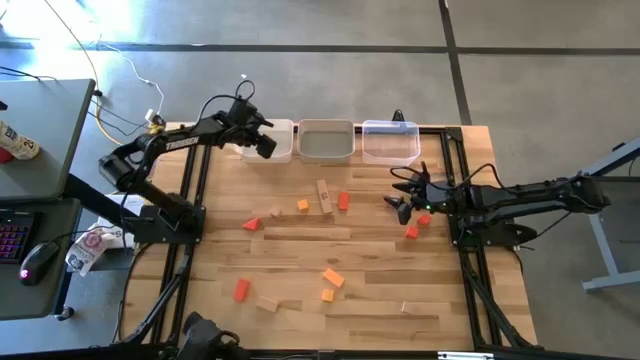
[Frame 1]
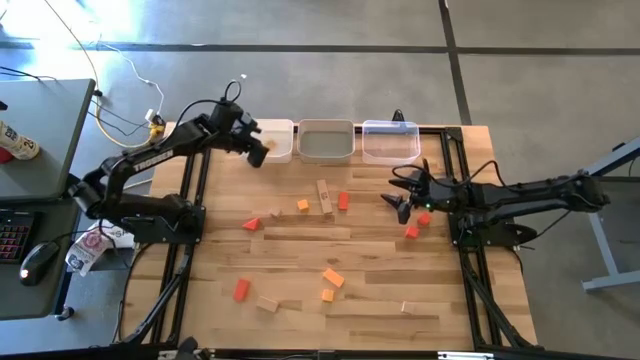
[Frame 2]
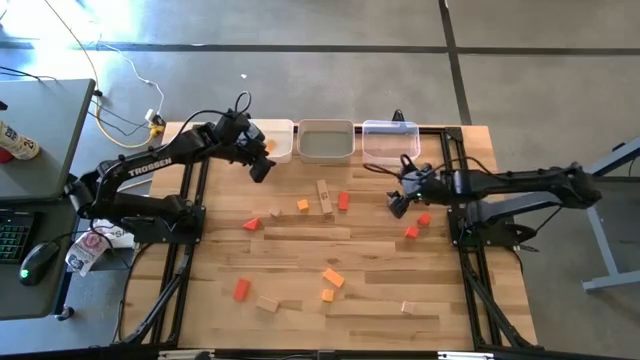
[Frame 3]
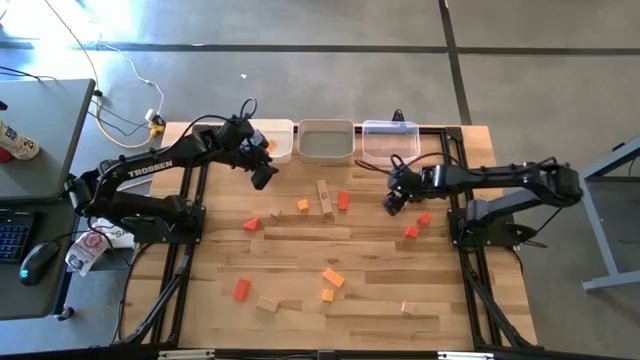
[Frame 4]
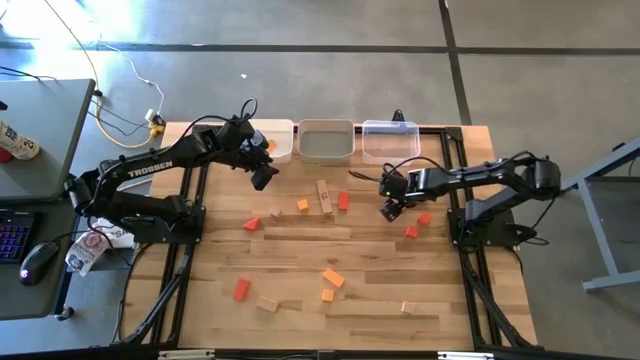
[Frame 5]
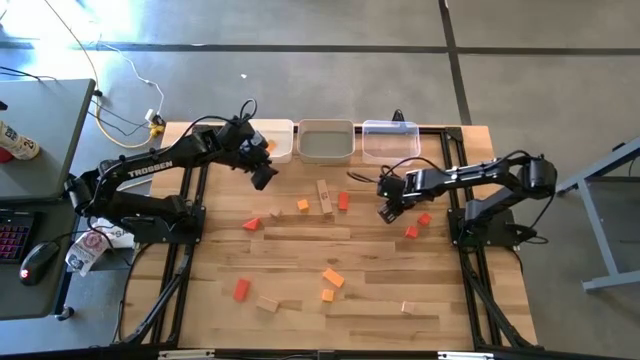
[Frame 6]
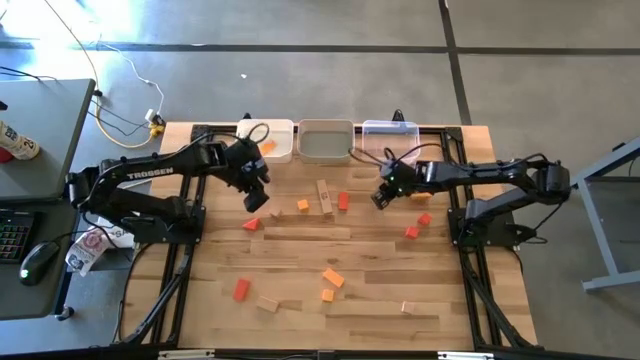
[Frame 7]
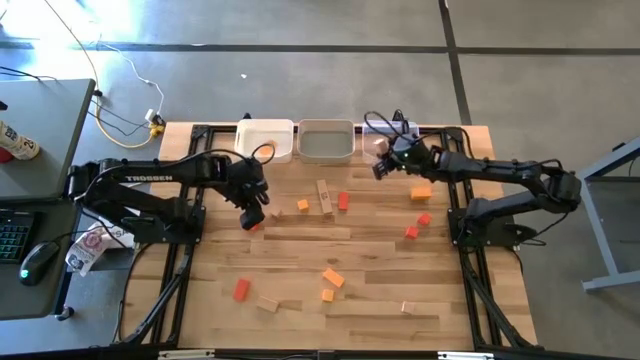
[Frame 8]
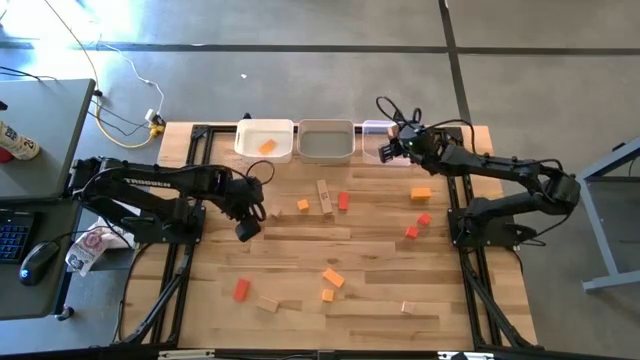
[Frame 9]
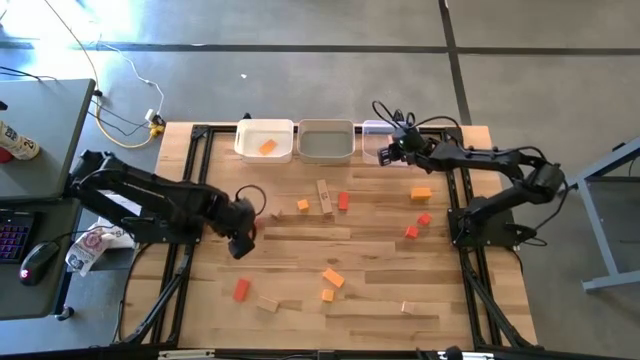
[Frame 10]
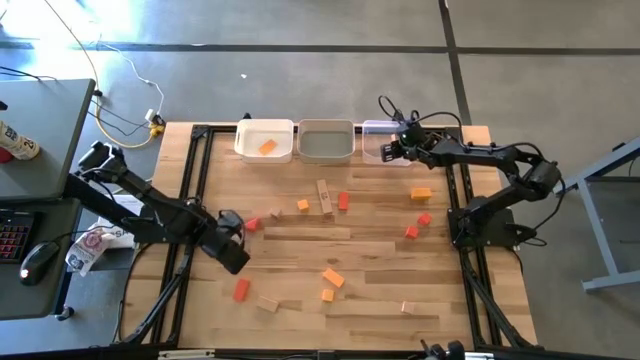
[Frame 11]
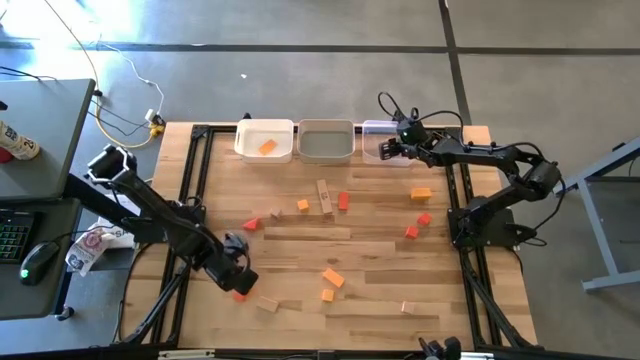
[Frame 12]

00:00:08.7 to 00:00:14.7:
Task: Sort & place blocks by color
Put the brown block into the transparent bin

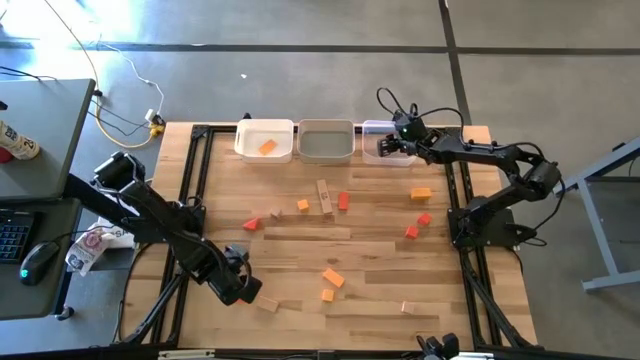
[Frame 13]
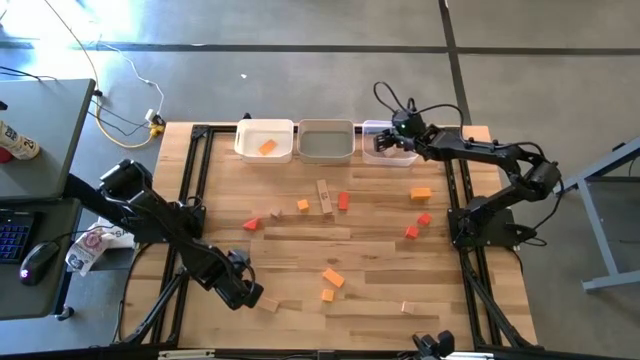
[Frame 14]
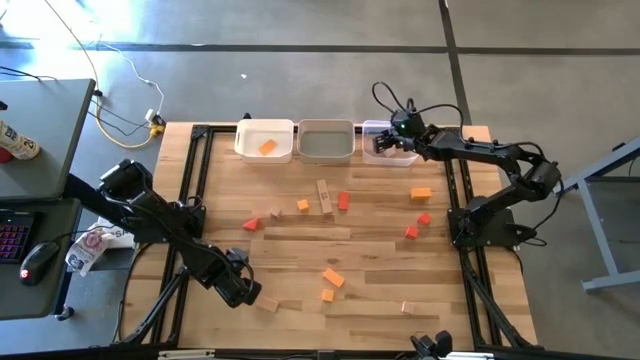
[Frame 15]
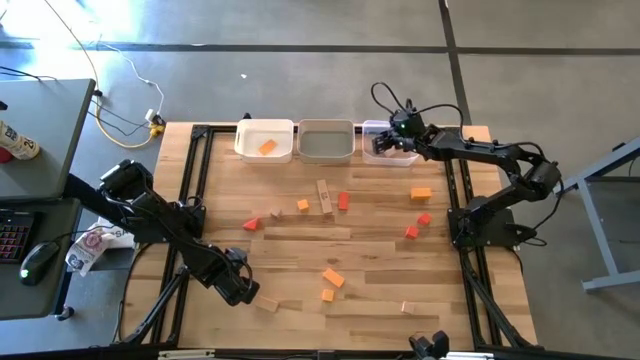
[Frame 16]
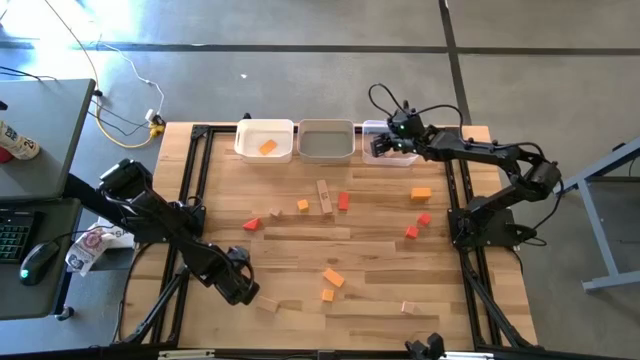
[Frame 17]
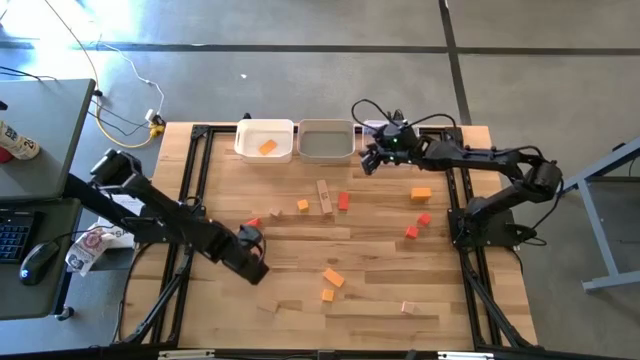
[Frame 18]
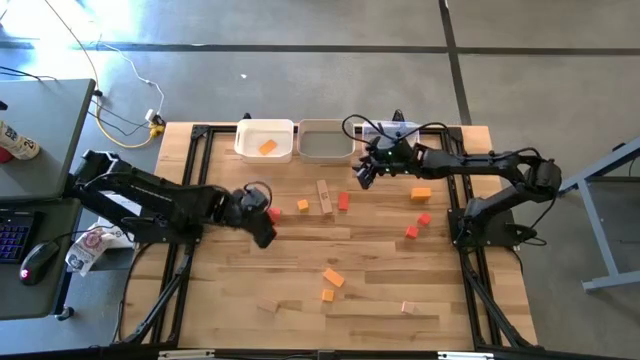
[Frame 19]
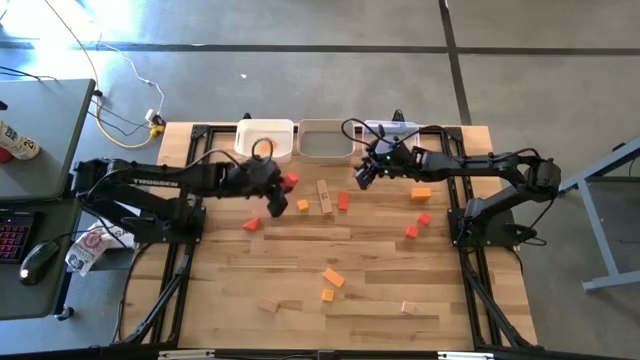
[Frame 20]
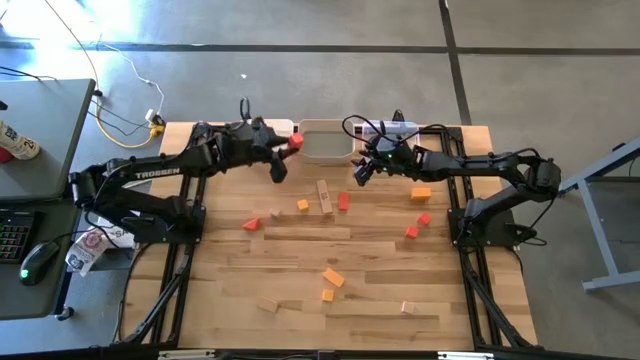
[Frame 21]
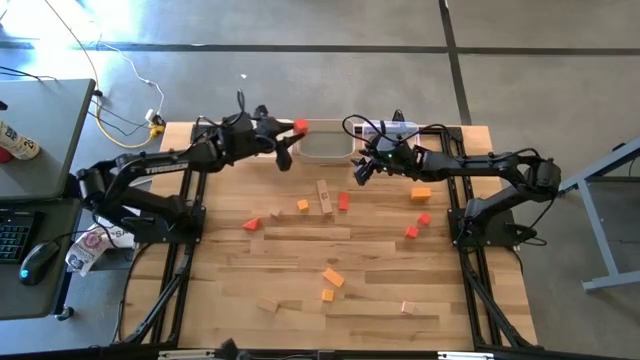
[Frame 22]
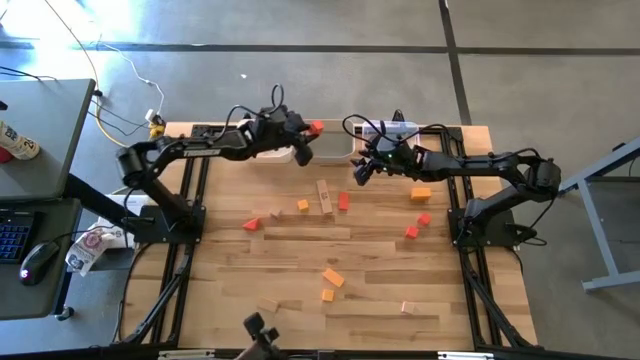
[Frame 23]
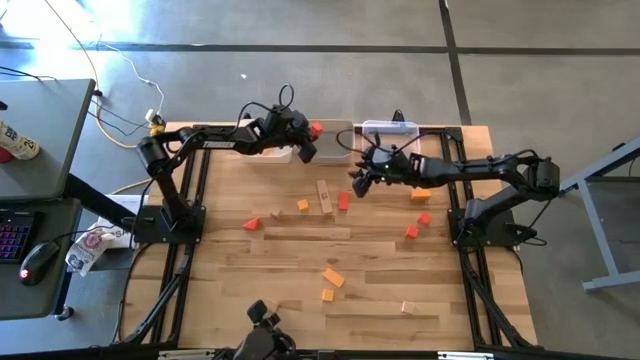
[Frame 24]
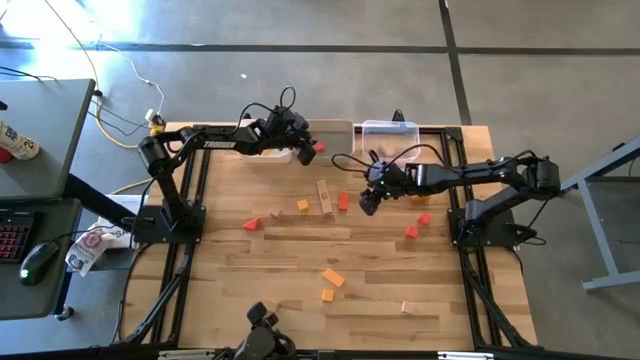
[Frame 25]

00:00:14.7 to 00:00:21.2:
Put the orange block into the gray bin

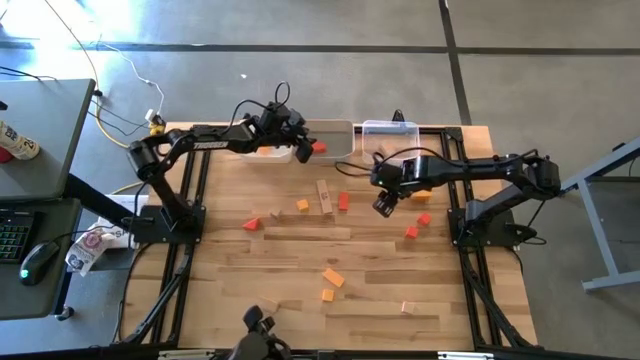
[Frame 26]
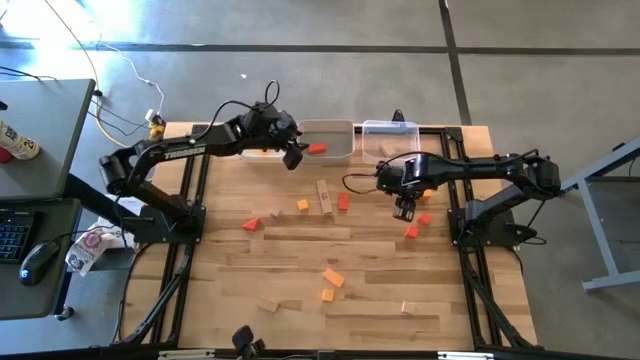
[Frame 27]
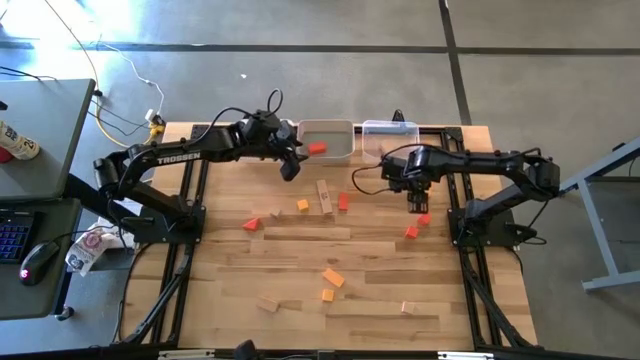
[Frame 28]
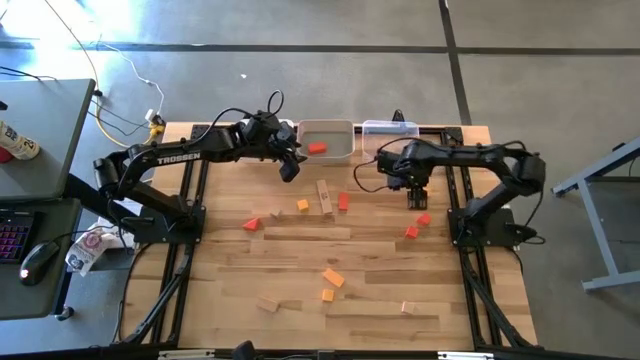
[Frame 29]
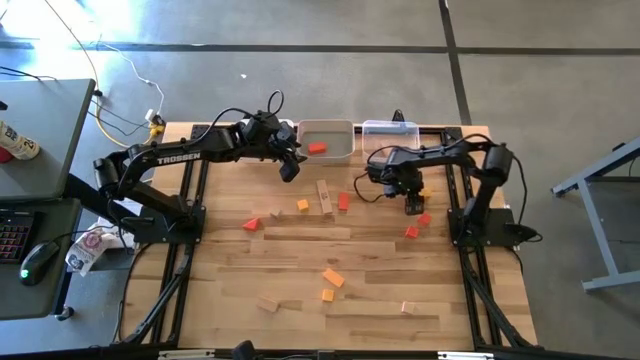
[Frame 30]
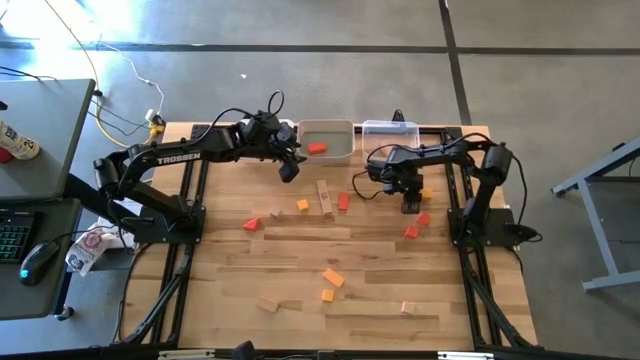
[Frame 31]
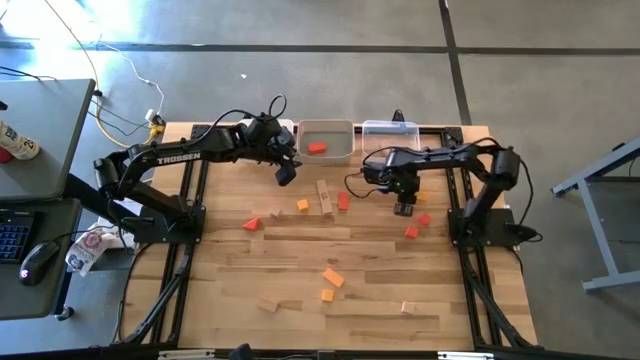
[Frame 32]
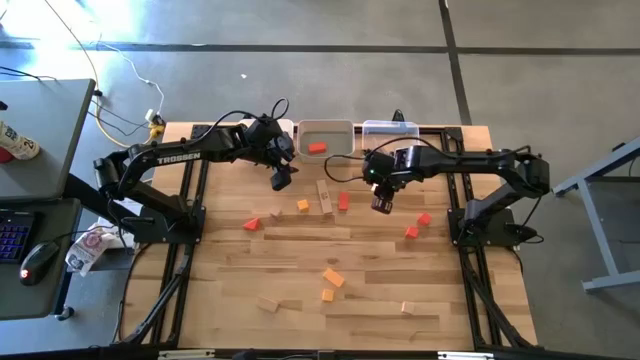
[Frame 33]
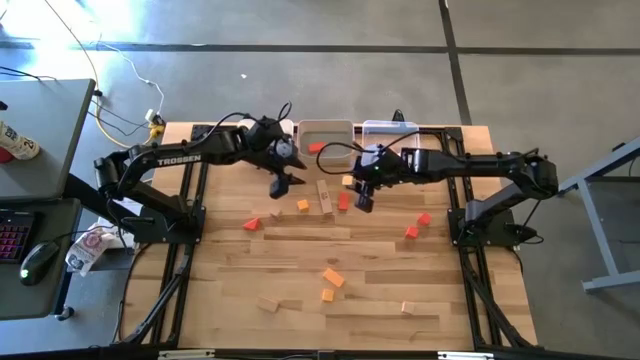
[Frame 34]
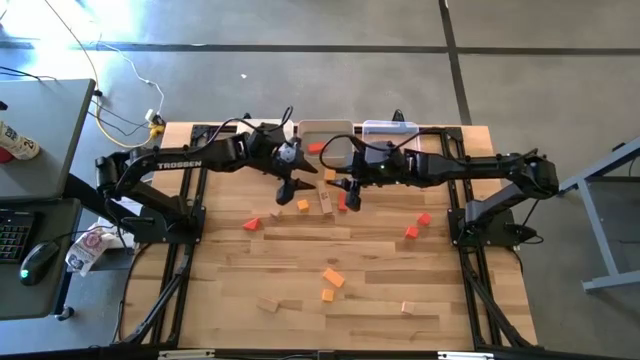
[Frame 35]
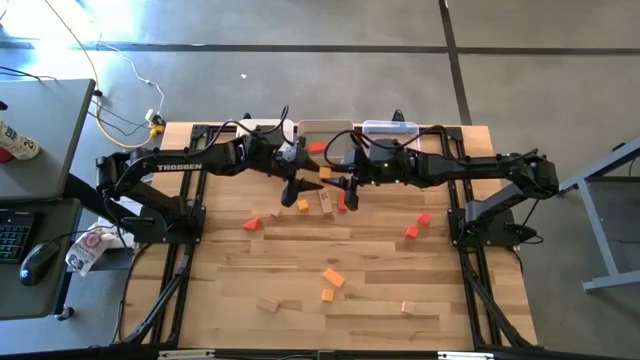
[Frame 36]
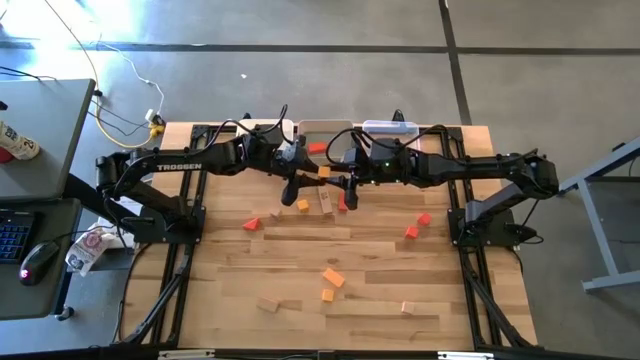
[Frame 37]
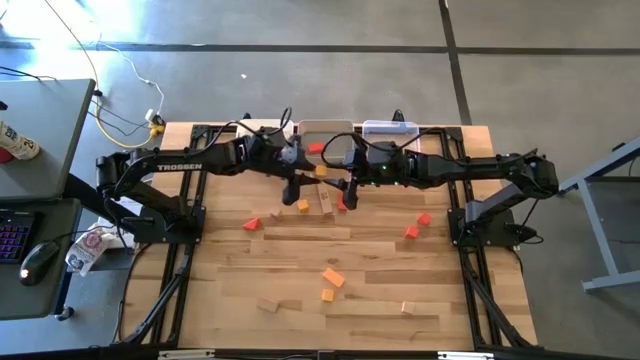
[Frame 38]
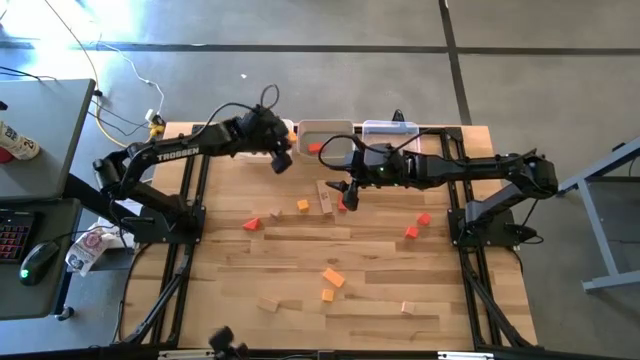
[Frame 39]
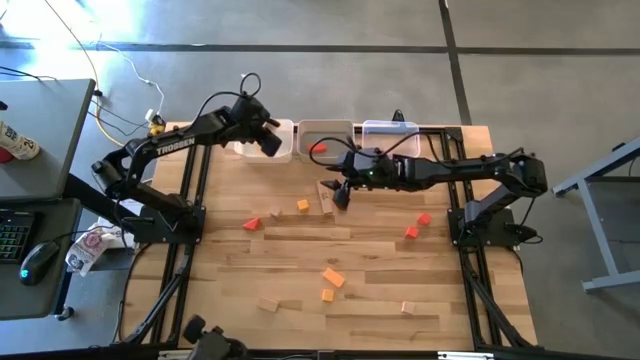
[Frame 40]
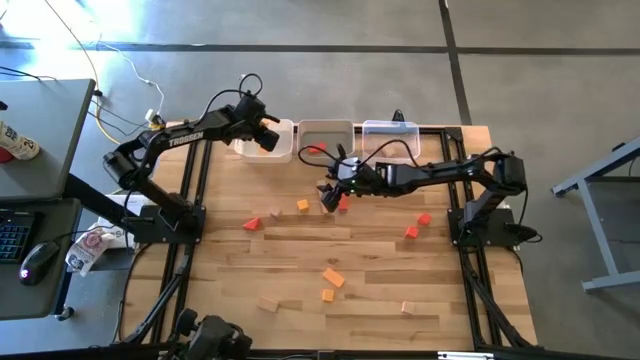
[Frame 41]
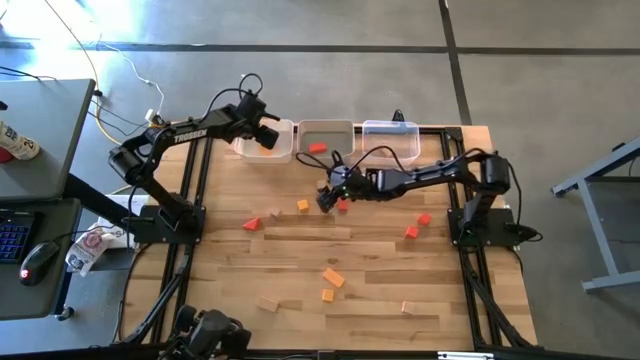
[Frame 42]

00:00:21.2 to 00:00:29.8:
Put the yellow block into the white bin
